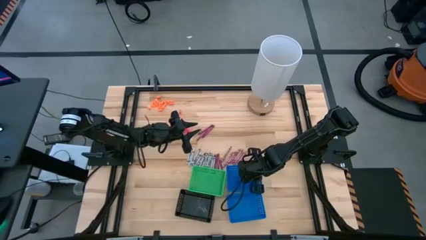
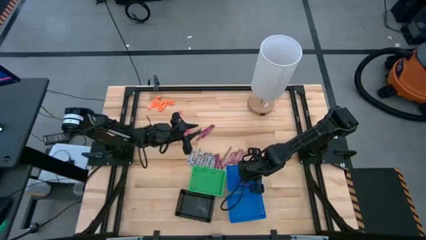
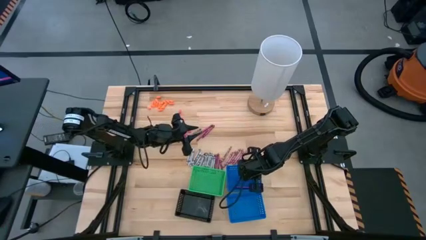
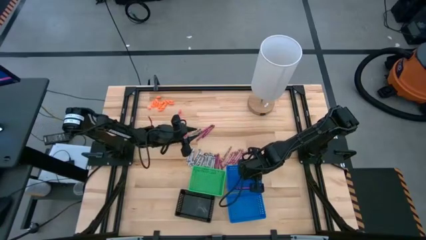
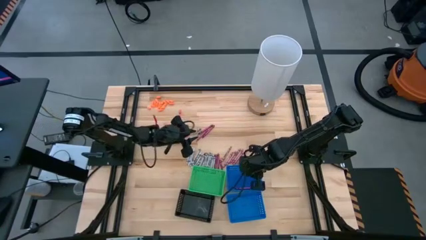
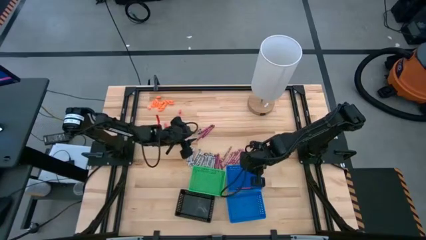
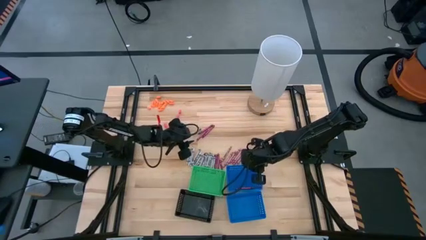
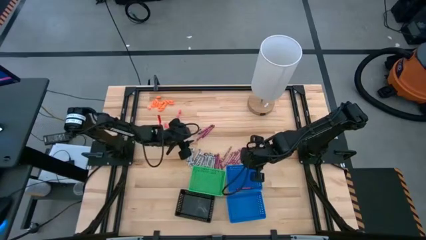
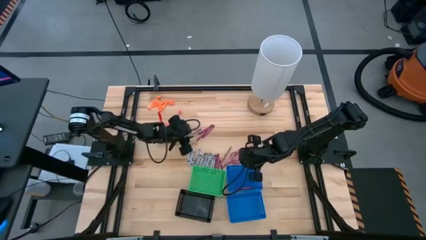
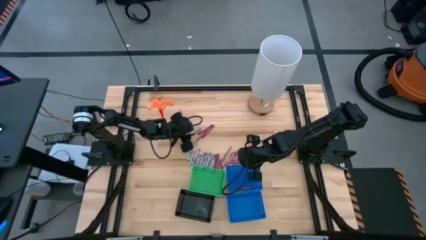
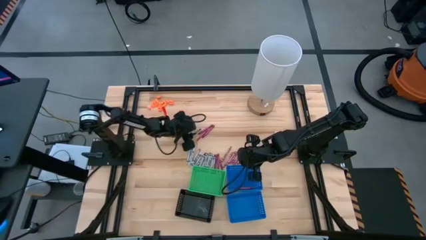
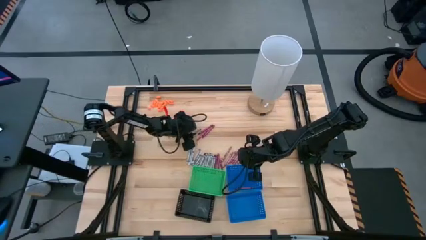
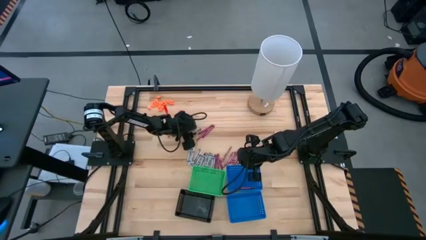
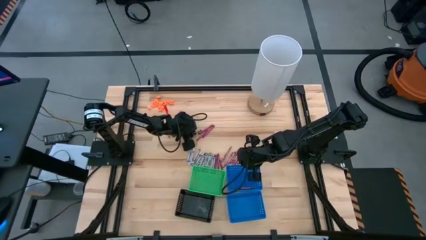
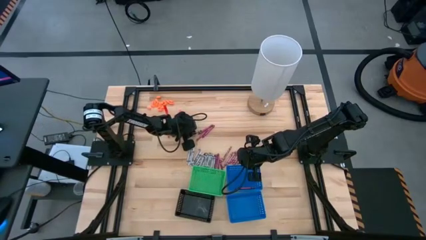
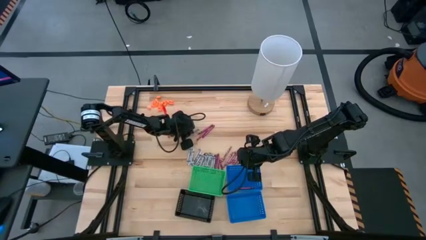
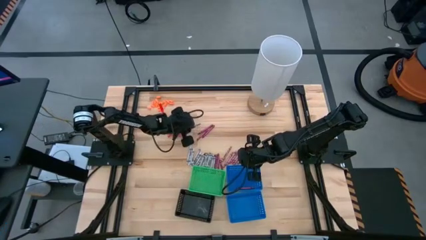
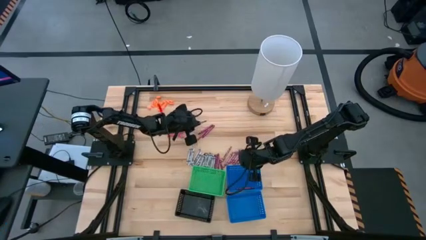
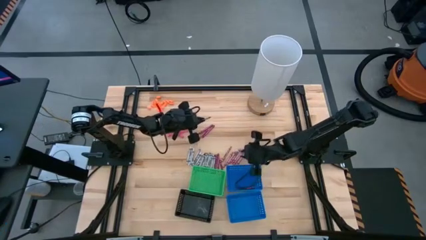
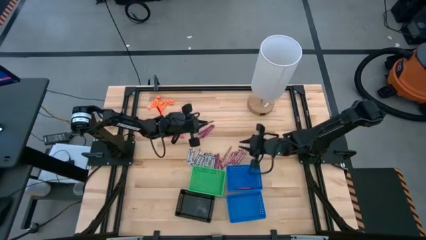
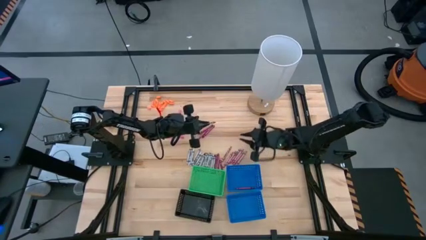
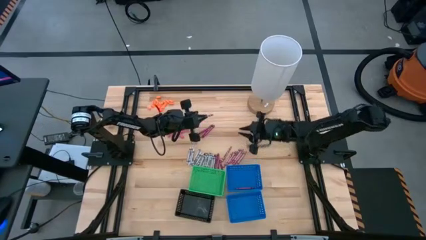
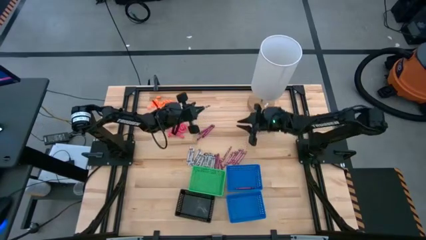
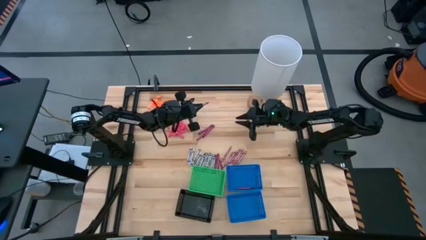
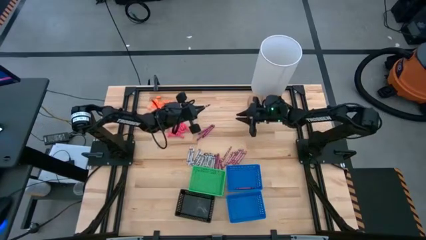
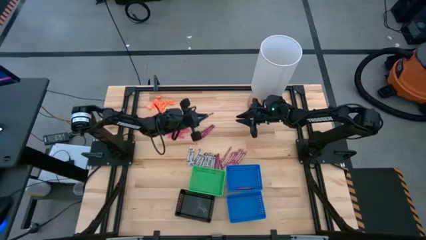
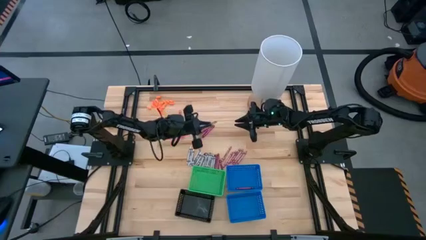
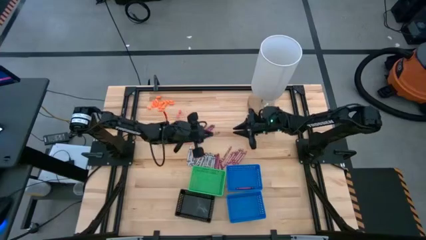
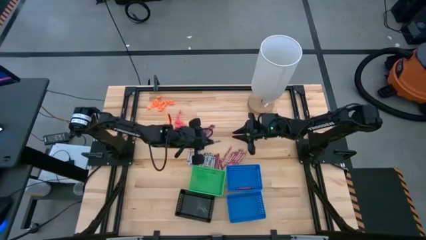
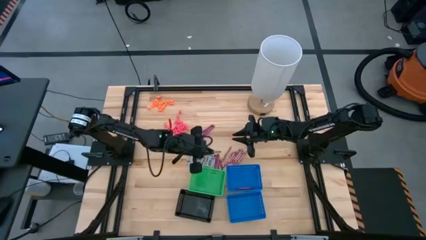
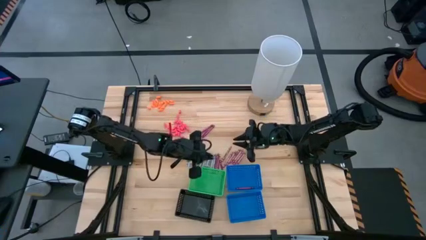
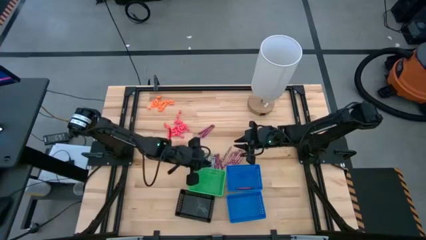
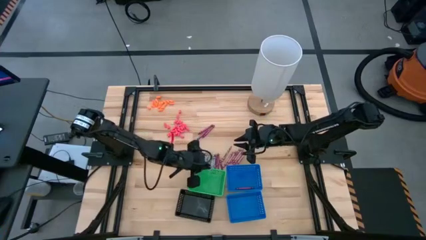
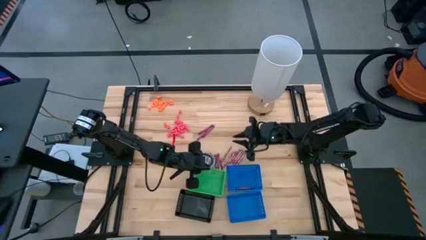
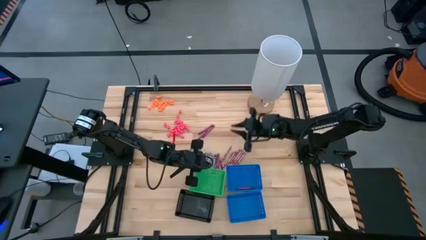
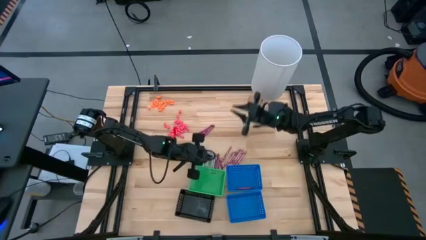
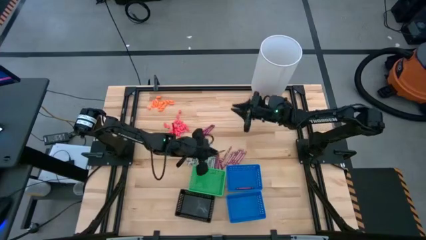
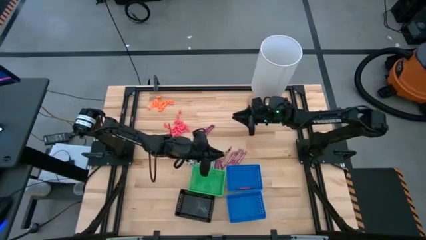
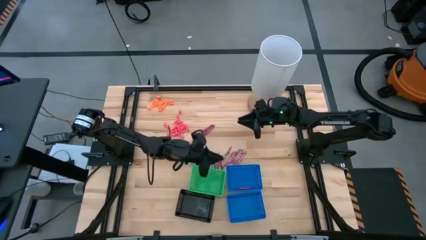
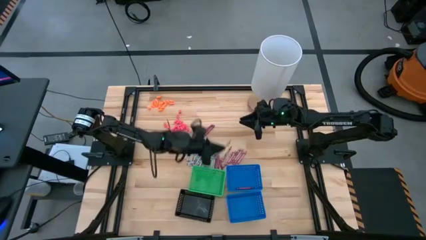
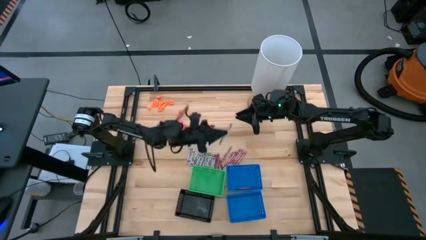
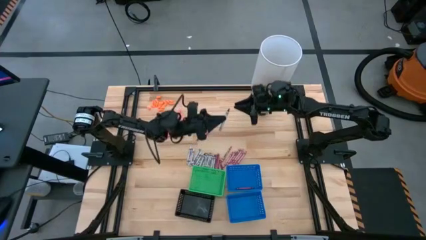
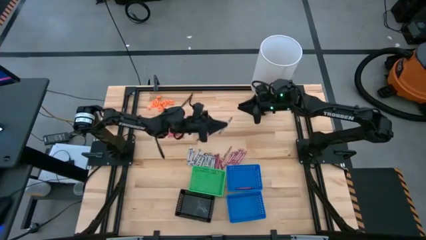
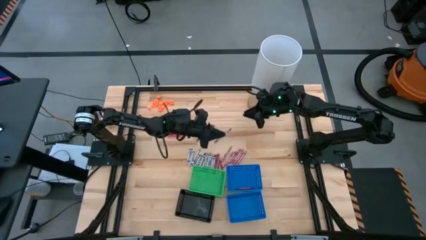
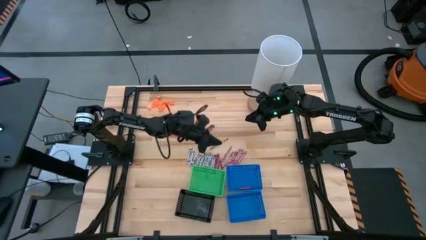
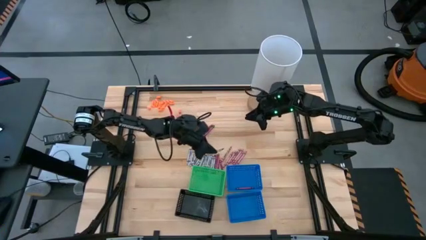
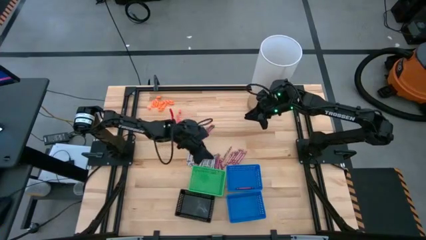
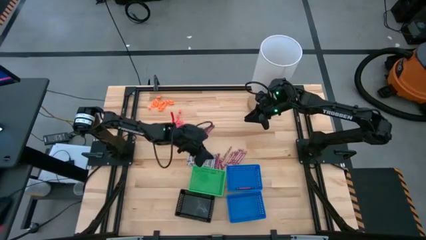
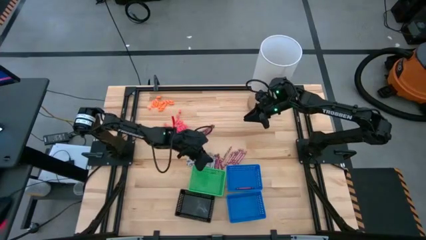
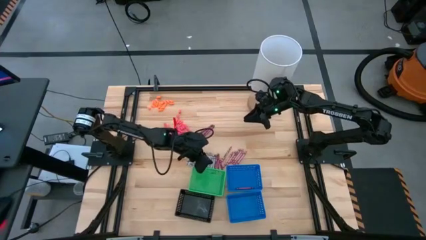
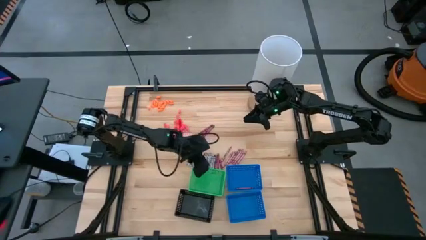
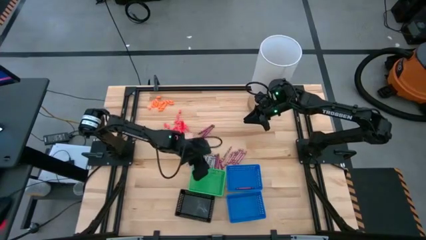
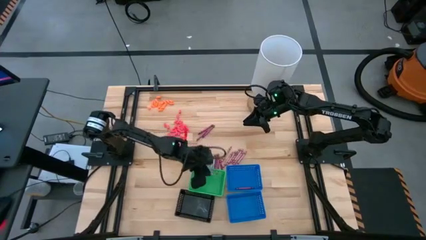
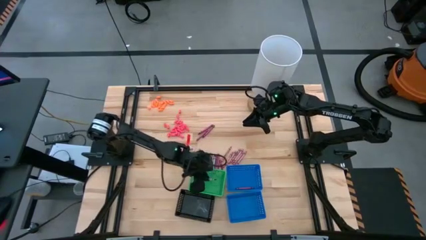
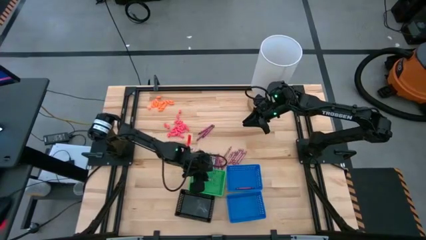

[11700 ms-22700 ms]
Task: Sort crayons
Put the black crayon into the green bin

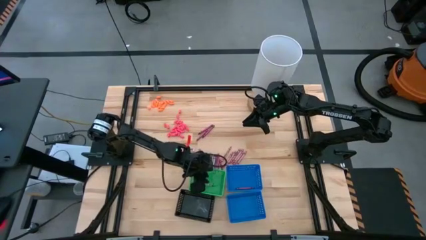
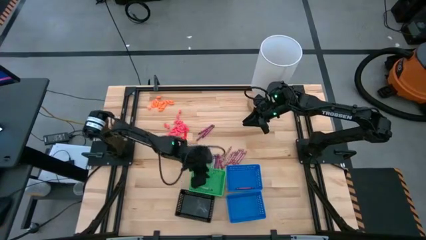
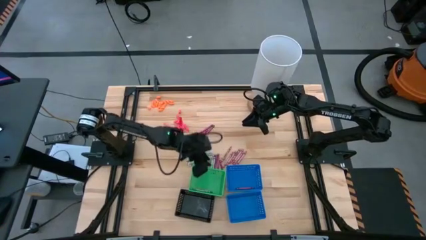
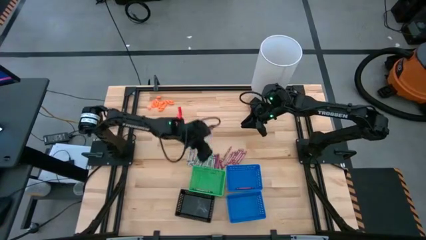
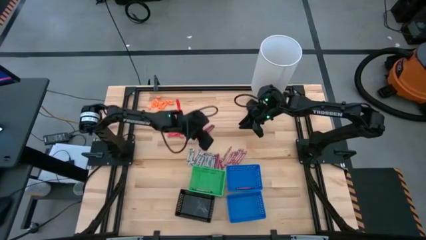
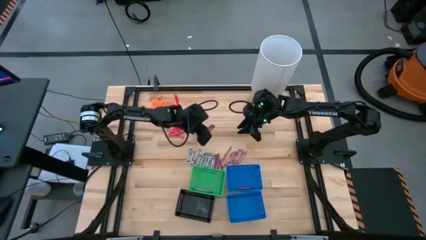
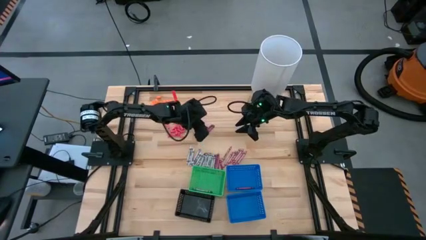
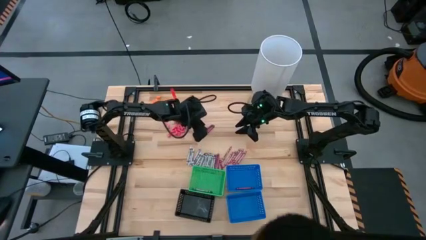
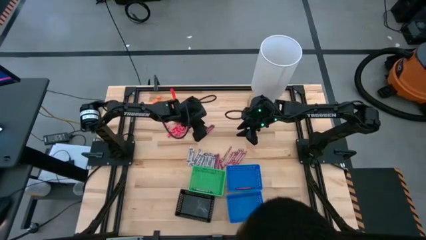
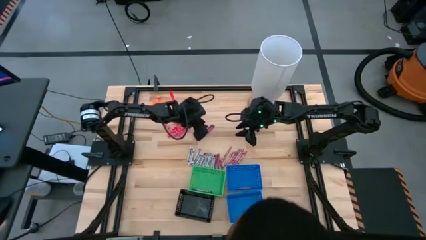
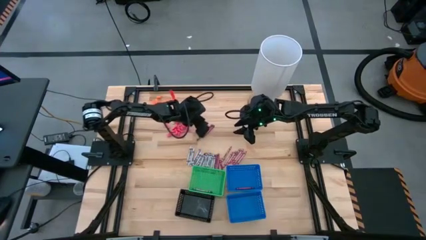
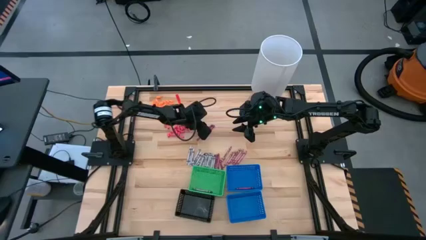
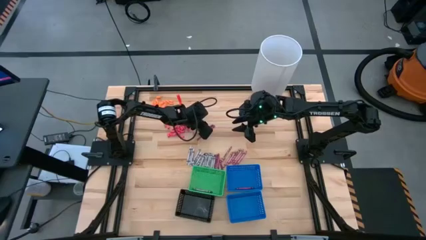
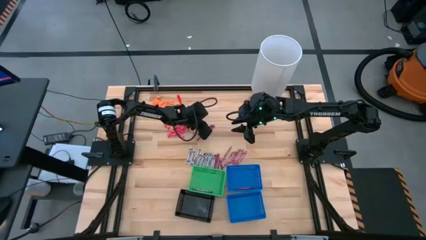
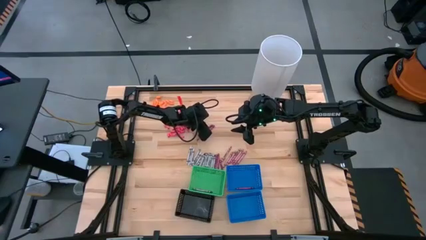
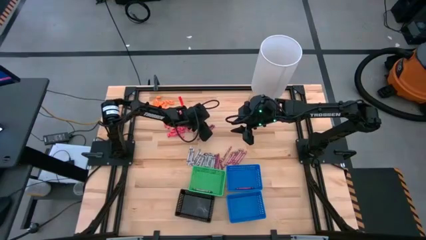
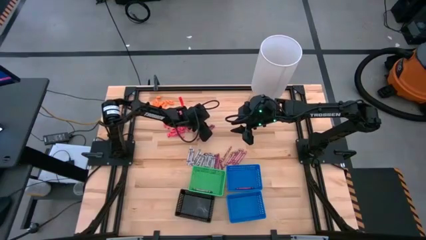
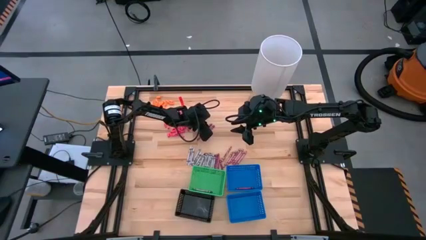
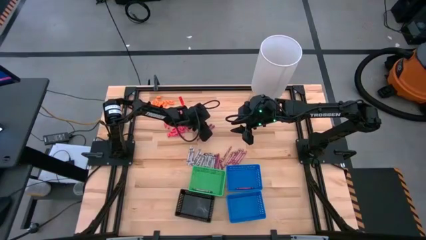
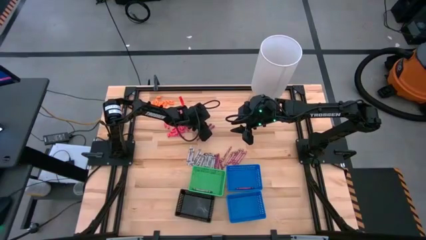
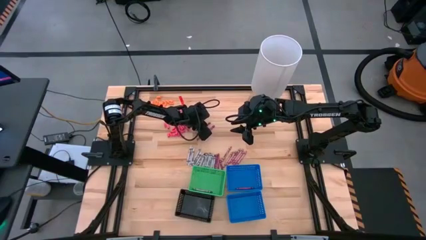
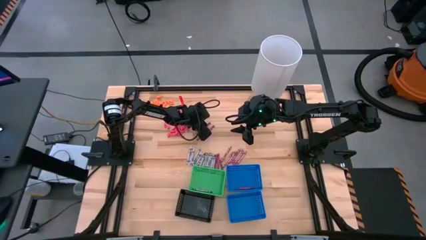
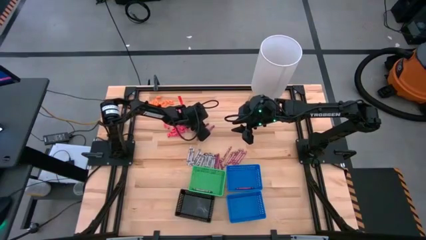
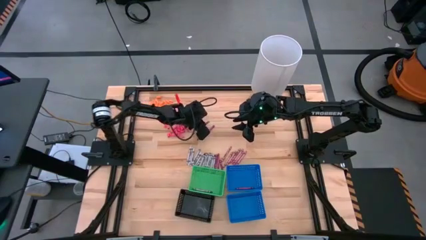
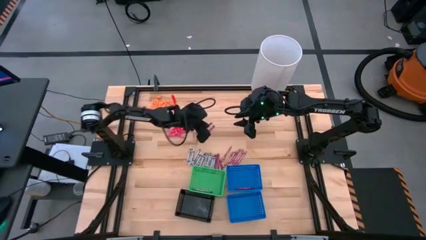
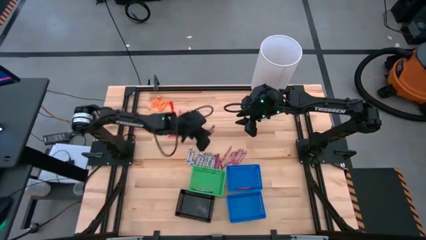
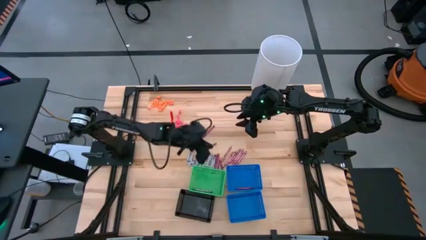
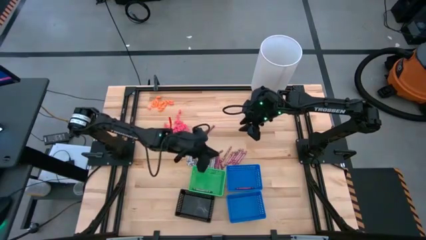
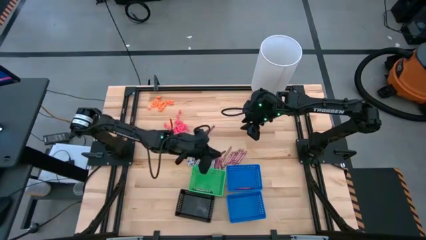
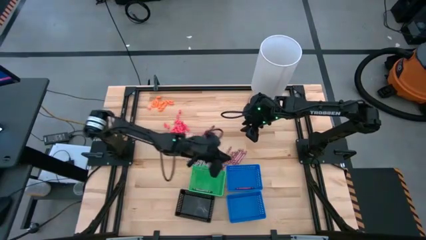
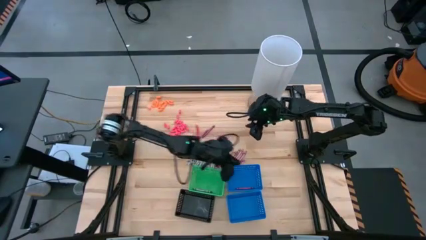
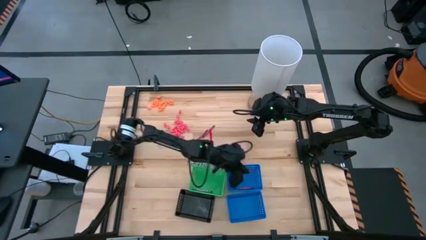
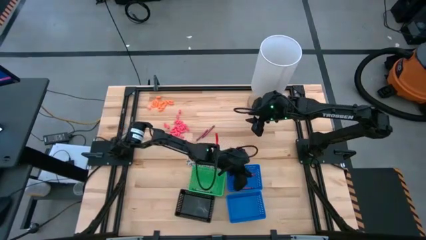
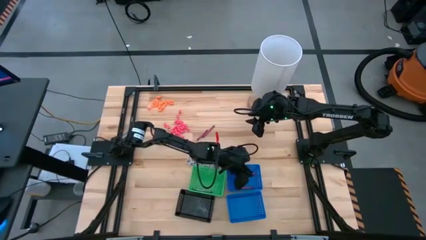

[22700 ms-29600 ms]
Put the violet crayon into the top blue bin
